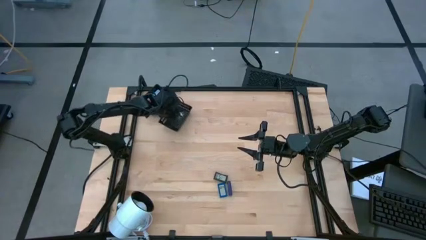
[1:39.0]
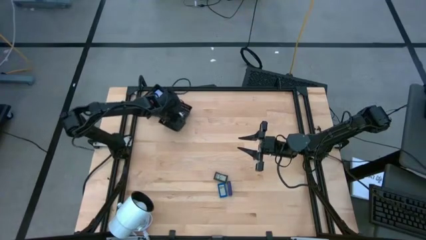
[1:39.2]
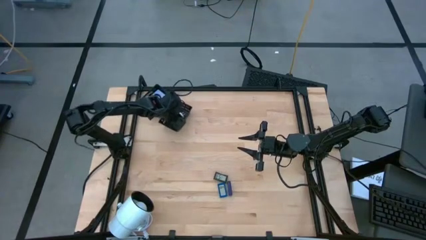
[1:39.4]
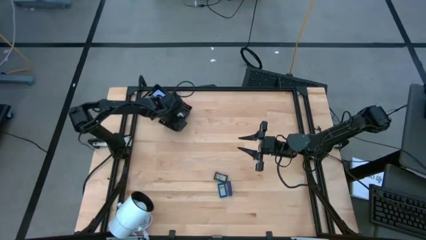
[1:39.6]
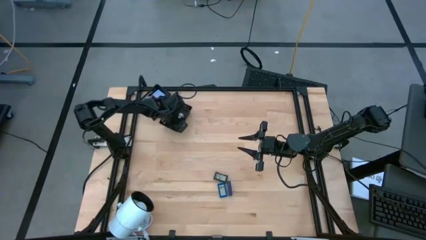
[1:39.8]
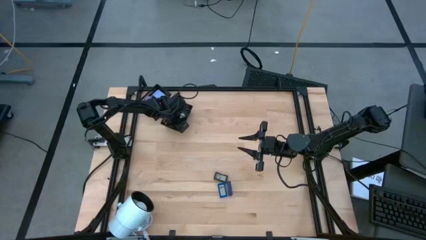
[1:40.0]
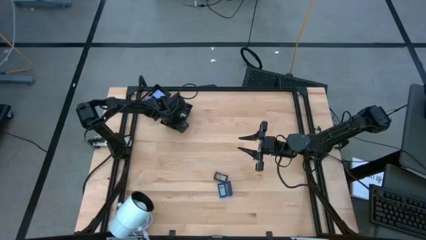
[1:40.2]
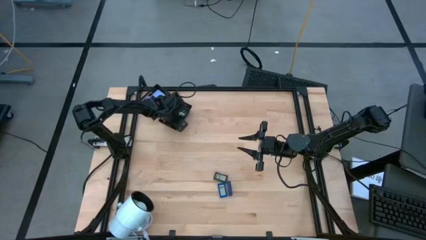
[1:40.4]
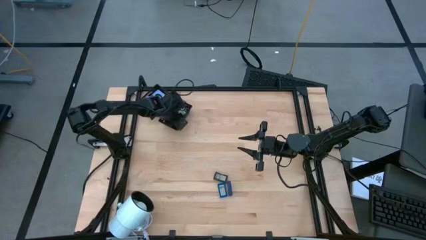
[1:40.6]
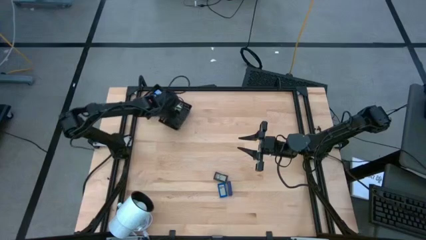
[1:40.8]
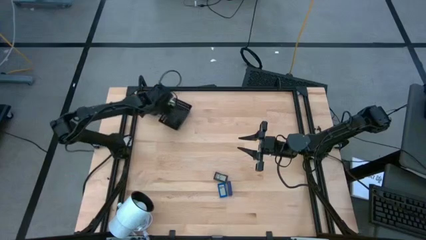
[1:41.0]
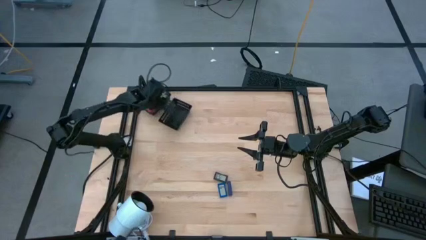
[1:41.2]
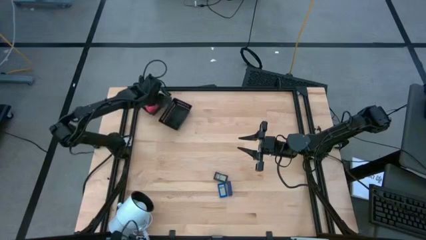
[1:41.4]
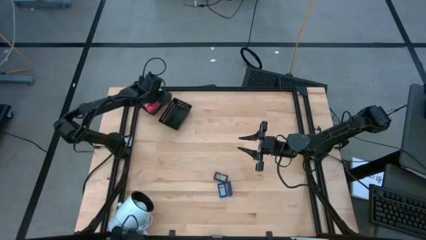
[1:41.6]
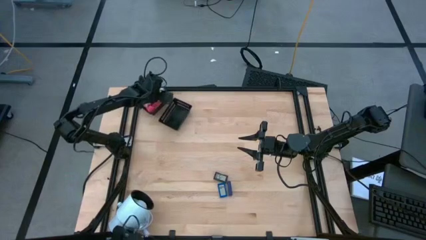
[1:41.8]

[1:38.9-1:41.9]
Task: Pick & Place Office items
Put the green charger adapter into the top black bin

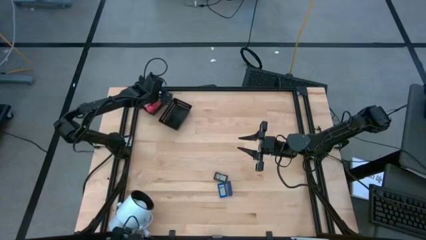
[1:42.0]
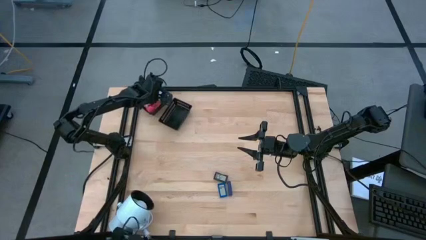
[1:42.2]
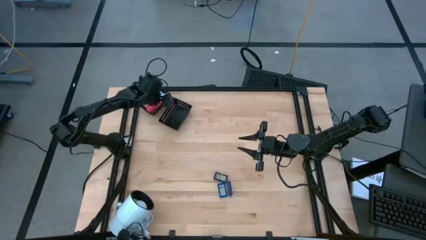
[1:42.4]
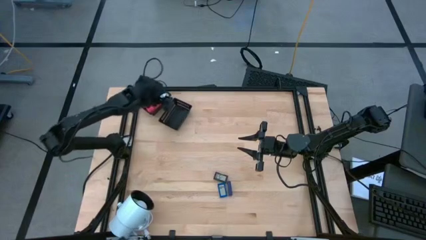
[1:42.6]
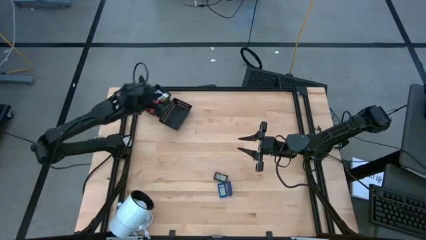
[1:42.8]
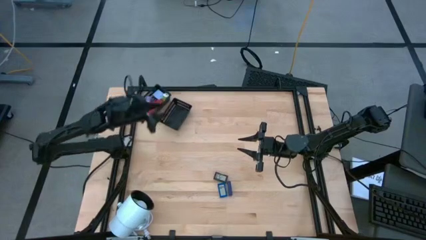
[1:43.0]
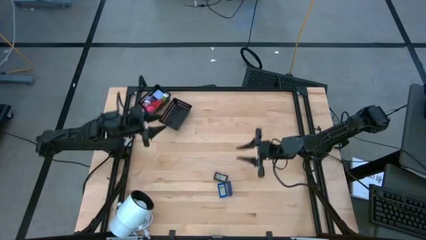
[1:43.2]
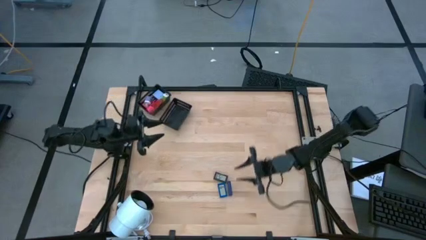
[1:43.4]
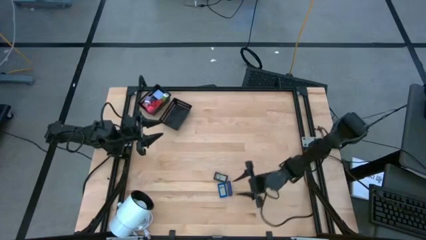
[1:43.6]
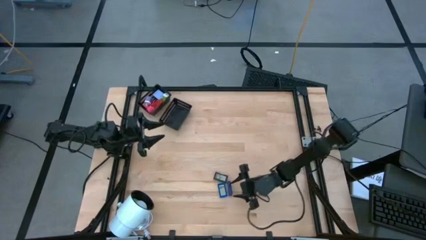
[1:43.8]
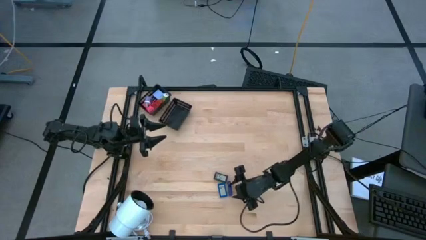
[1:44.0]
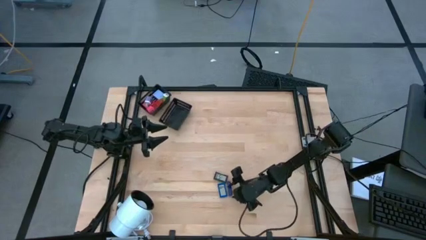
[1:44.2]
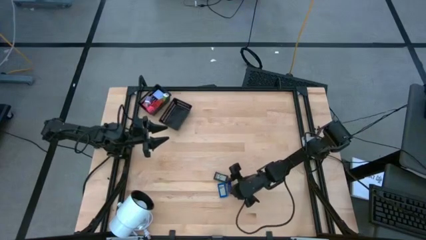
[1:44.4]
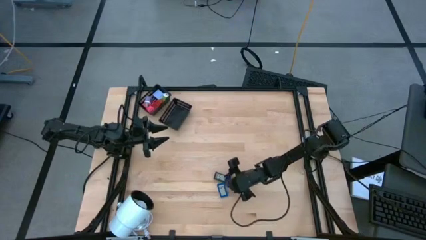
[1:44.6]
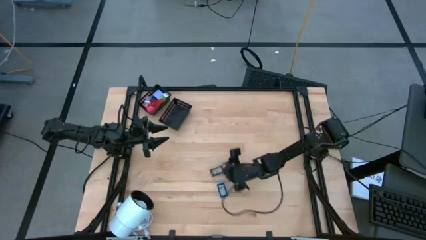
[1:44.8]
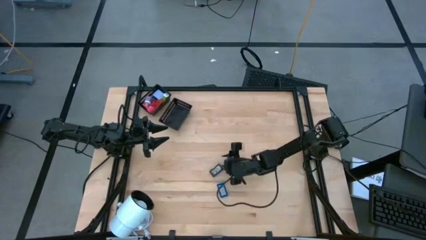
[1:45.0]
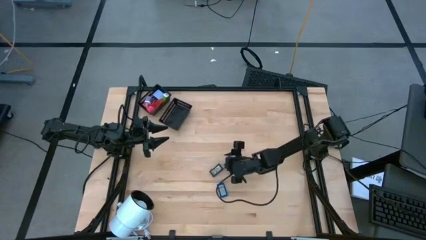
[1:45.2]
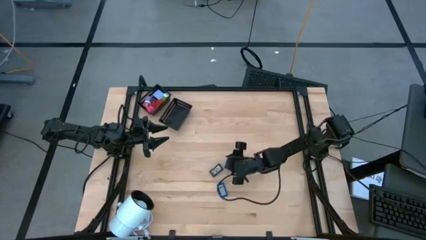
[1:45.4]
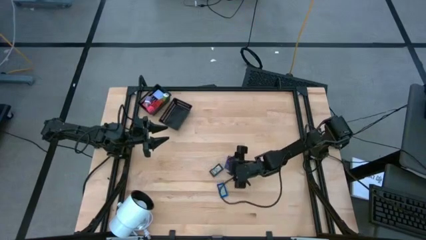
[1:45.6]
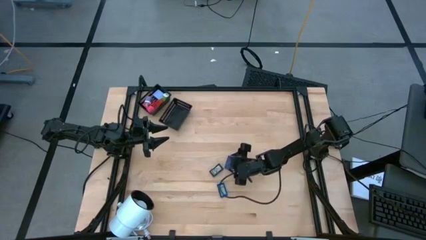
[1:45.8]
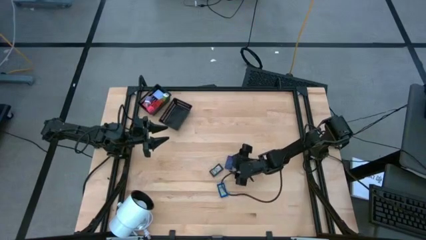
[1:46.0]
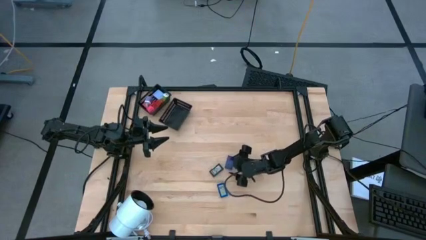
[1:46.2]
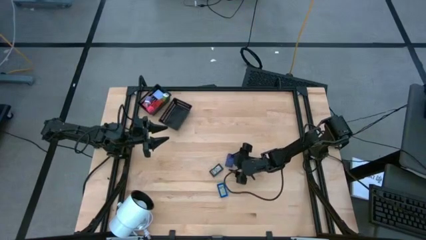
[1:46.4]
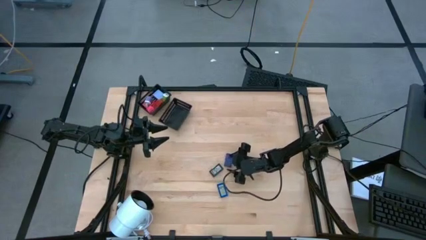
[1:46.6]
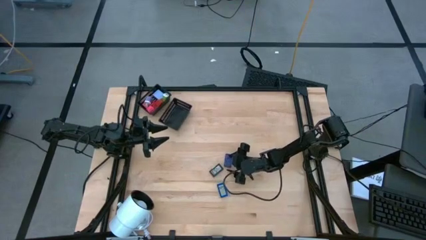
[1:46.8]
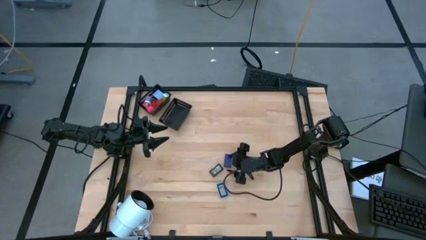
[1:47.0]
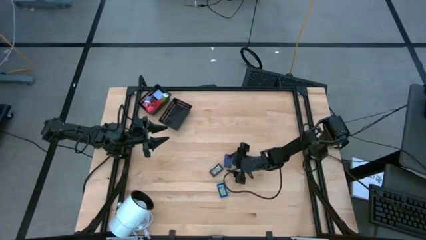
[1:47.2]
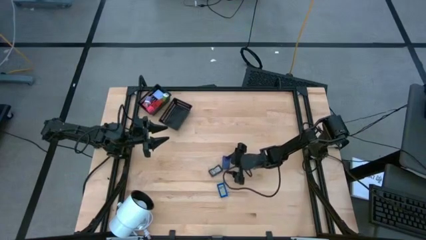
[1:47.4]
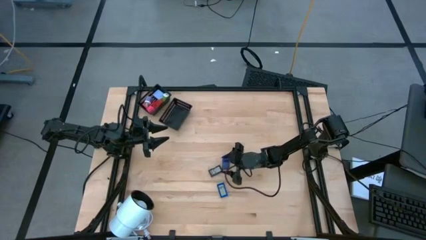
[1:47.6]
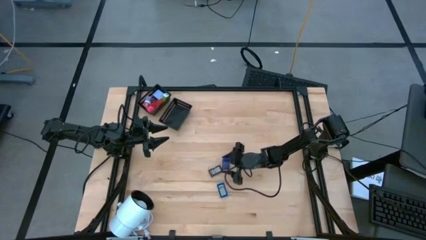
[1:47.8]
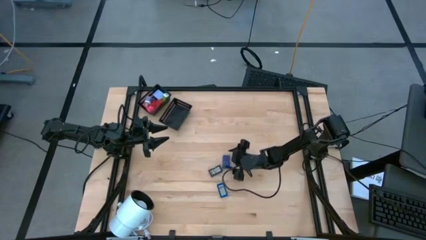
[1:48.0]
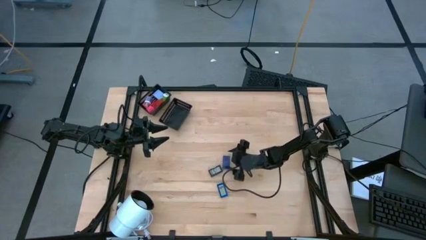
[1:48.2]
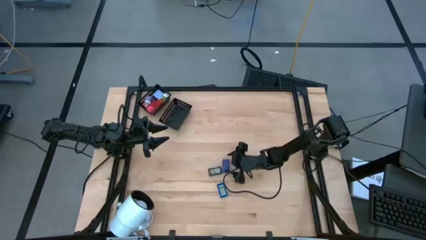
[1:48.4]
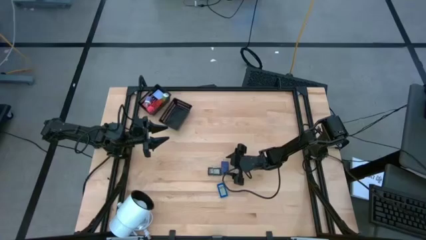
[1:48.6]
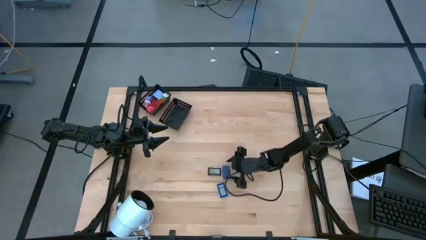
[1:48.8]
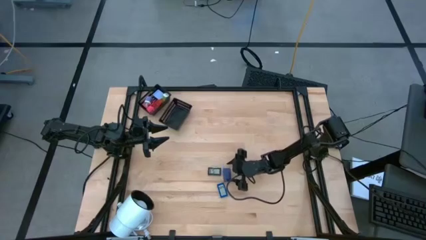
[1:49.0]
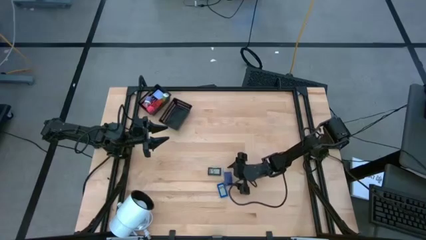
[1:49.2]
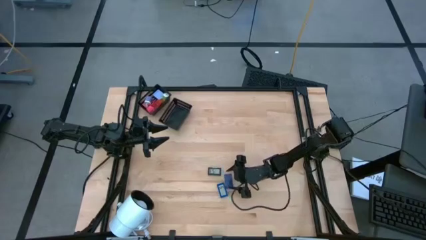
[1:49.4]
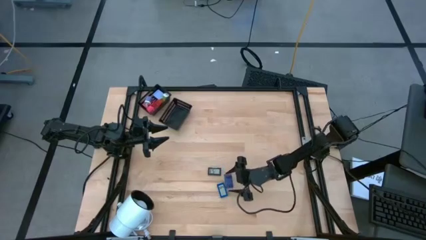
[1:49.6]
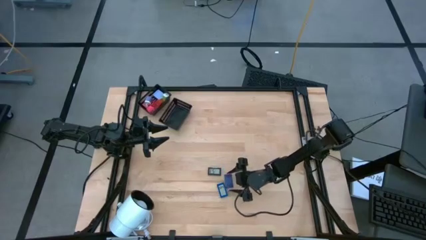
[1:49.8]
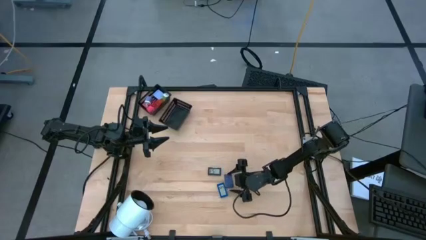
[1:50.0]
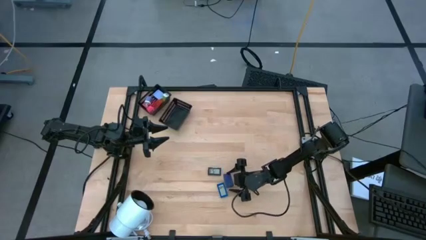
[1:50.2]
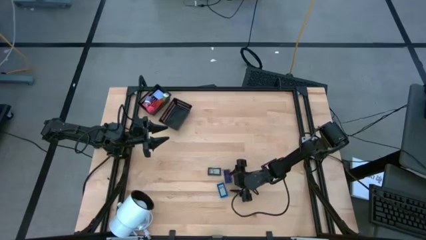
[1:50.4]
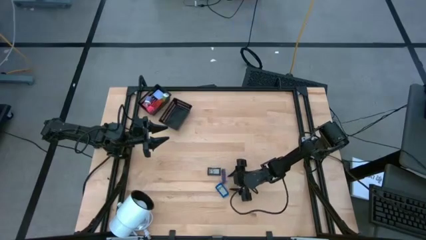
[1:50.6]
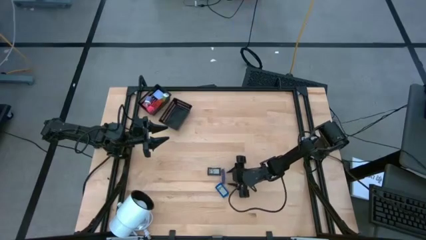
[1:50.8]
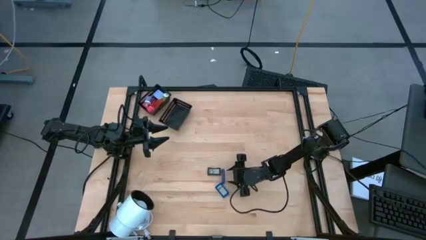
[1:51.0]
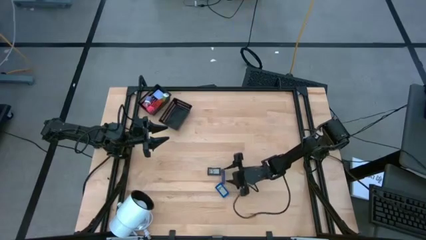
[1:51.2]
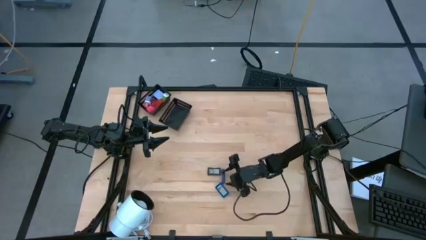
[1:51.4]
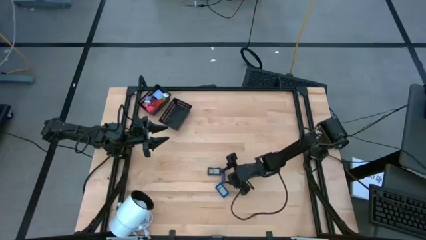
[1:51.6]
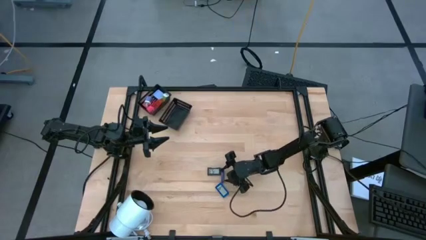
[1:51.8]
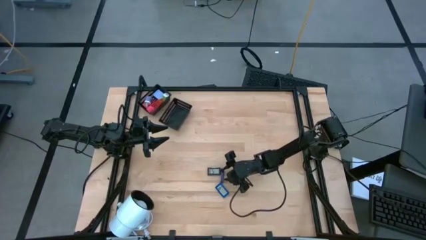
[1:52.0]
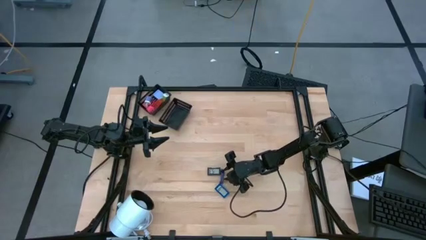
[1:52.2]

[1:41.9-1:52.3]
Put the dark blue timer into the bottom black bin

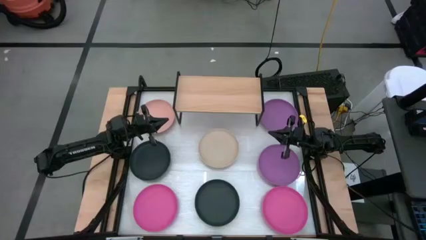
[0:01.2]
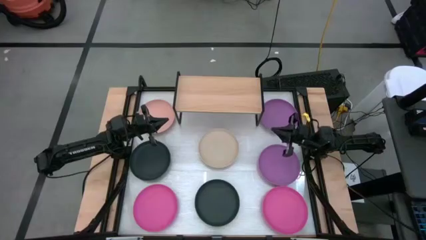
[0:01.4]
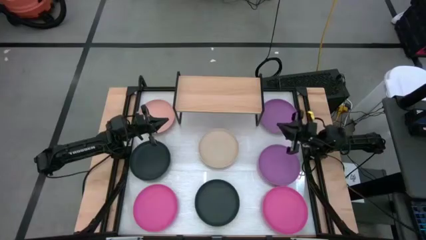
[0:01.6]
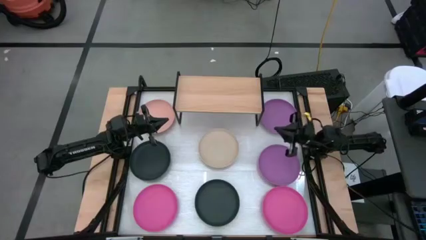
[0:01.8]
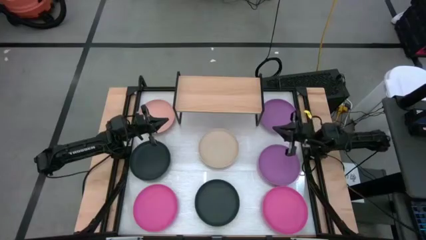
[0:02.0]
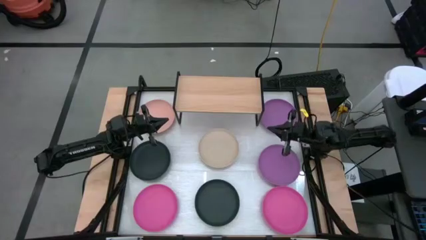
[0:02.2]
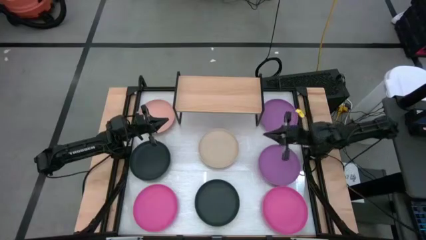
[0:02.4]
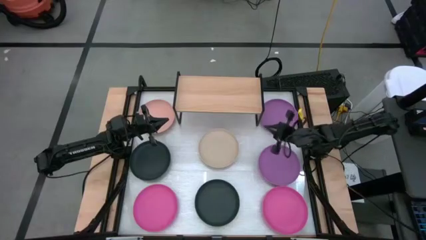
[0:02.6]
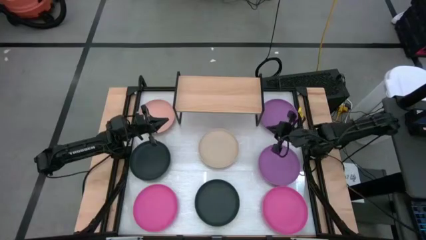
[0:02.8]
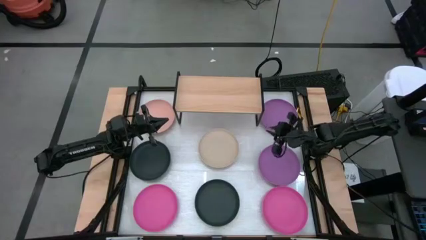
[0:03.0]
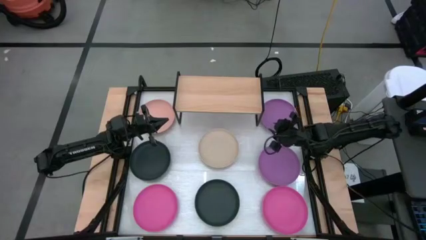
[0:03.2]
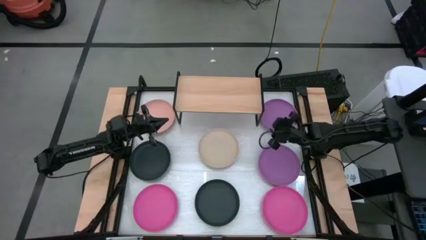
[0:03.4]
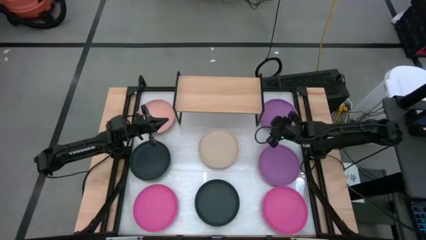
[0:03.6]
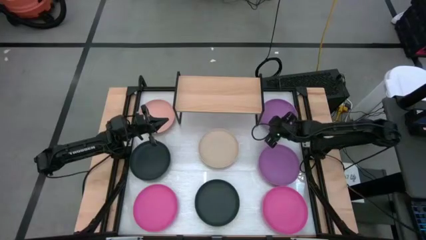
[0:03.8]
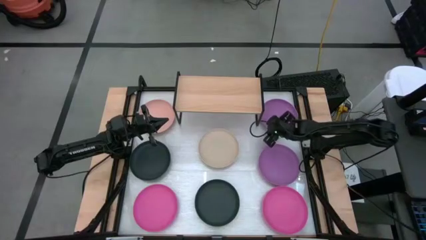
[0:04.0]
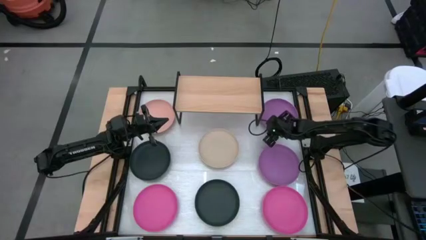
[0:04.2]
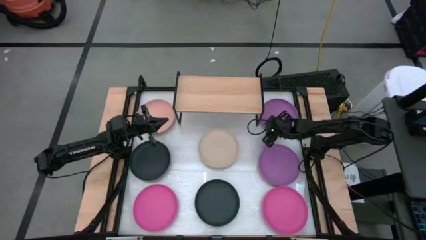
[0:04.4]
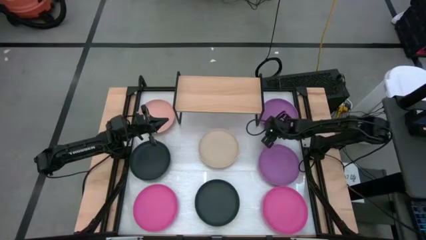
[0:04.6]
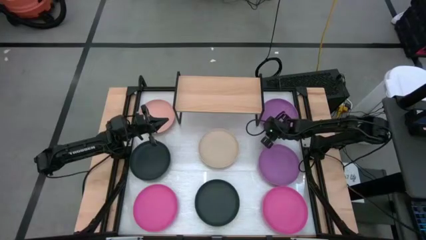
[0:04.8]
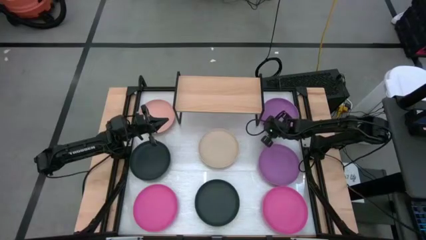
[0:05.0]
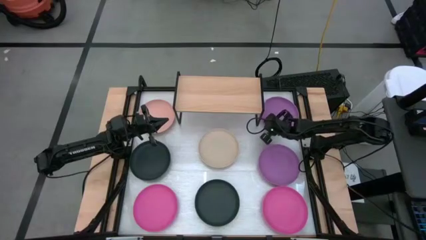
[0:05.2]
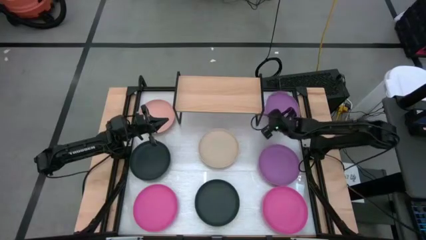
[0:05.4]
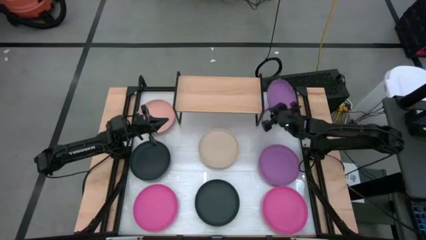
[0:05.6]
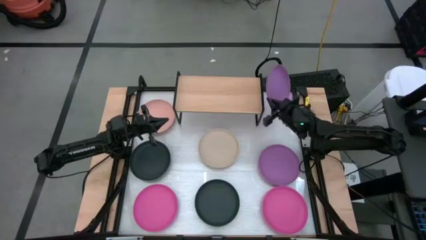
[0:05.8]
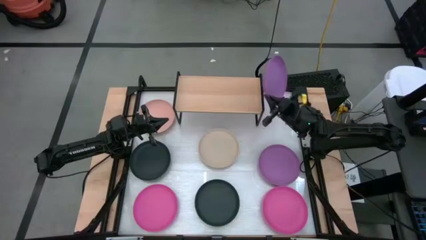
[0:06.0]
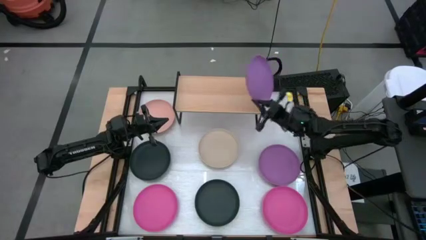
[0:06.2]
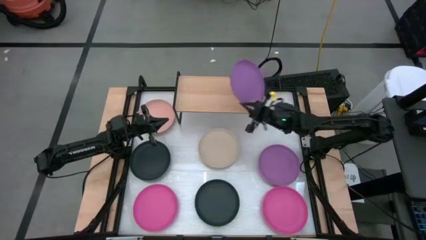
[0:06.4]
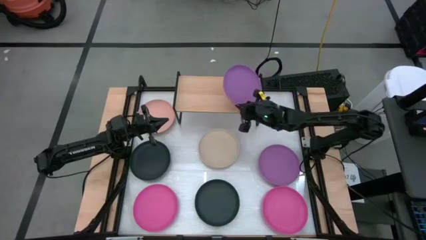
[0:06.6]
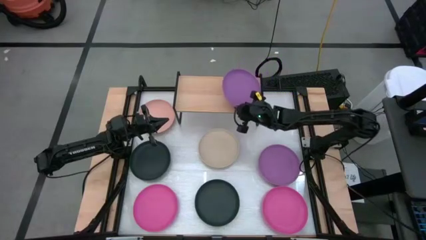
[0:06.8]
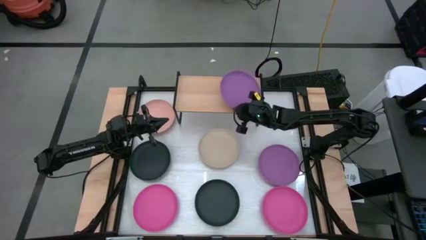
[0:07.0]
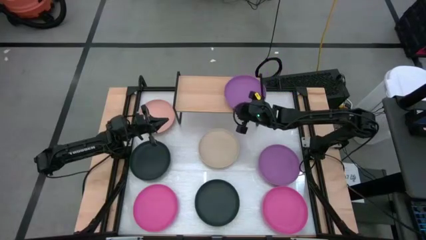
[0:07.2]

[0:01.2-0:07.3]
Task: Place and stack plates onto a shelf
Put the top purple plate on the shelf
